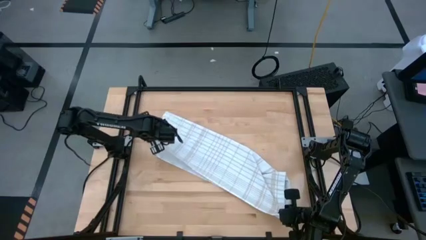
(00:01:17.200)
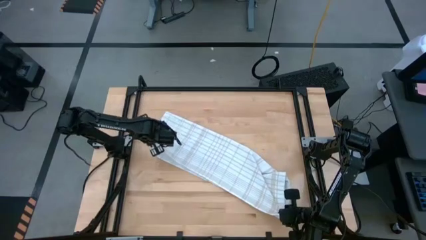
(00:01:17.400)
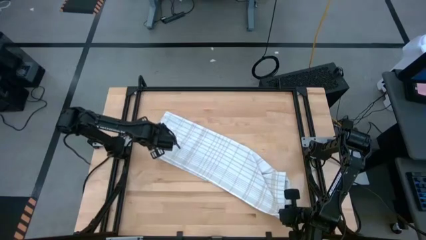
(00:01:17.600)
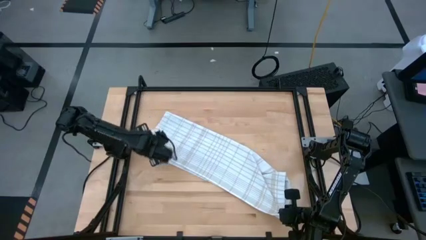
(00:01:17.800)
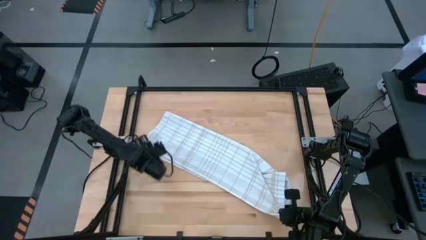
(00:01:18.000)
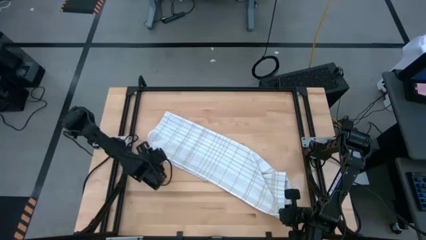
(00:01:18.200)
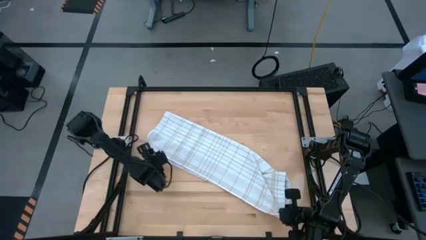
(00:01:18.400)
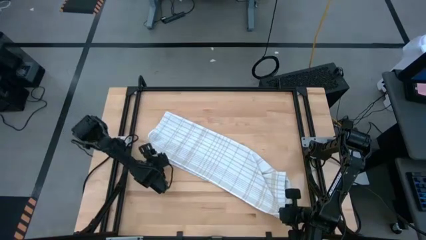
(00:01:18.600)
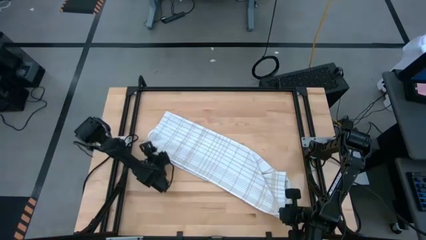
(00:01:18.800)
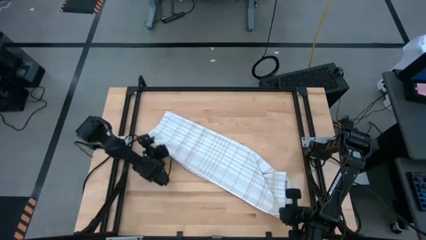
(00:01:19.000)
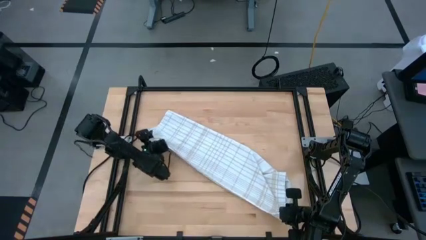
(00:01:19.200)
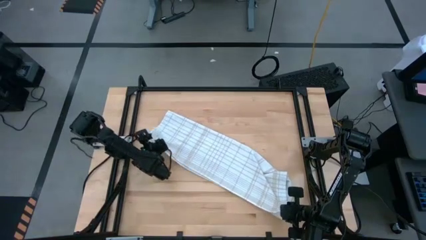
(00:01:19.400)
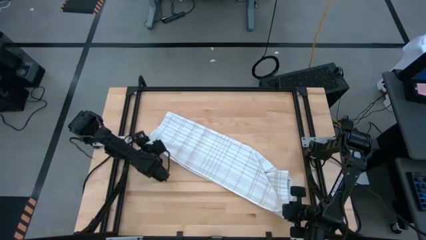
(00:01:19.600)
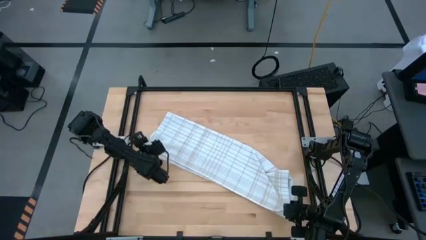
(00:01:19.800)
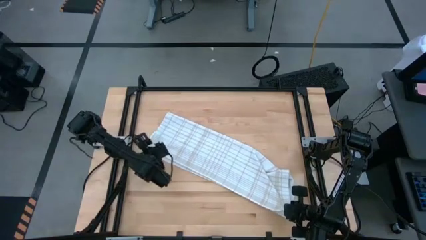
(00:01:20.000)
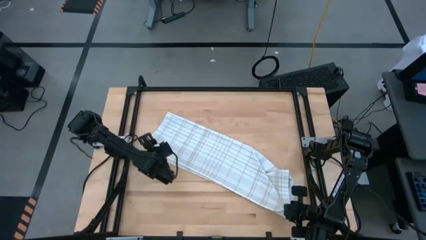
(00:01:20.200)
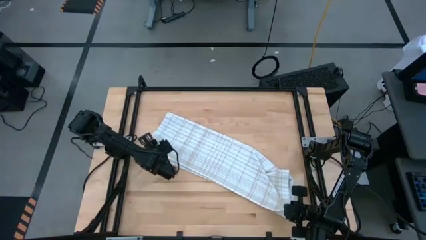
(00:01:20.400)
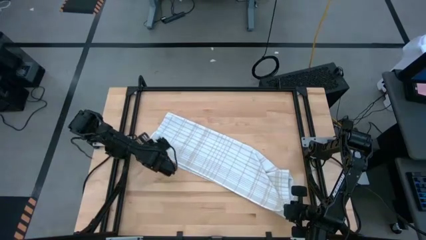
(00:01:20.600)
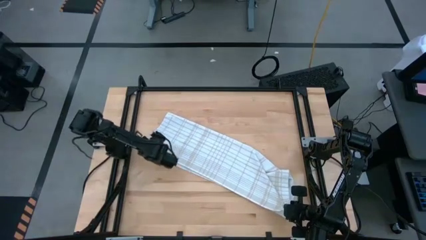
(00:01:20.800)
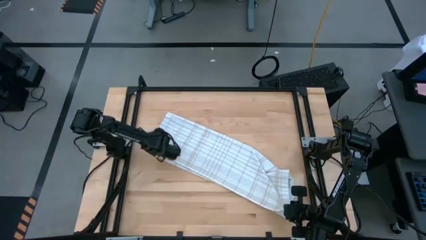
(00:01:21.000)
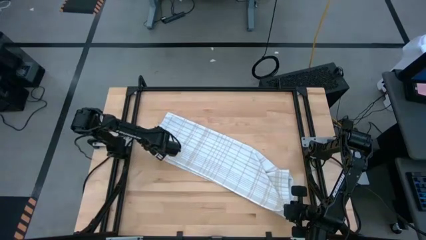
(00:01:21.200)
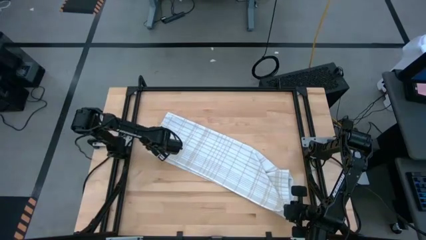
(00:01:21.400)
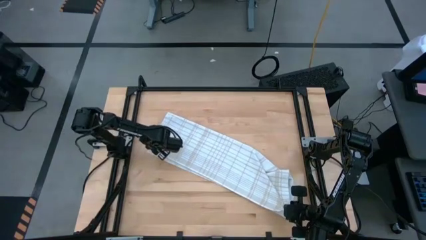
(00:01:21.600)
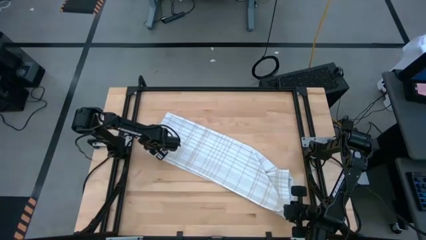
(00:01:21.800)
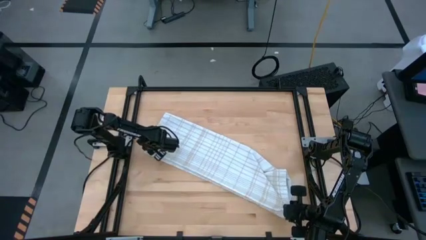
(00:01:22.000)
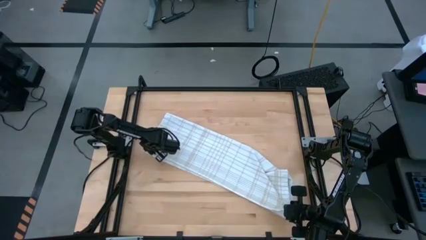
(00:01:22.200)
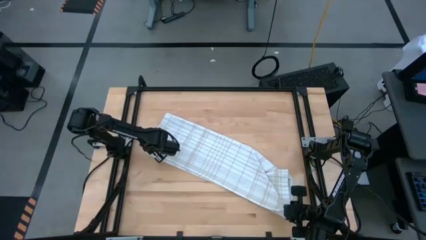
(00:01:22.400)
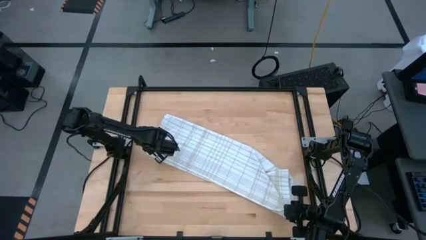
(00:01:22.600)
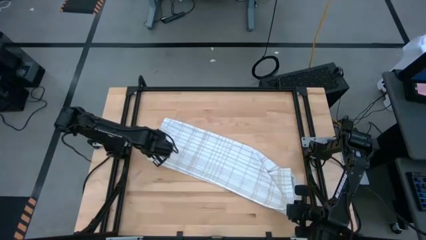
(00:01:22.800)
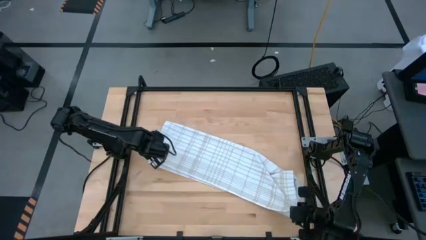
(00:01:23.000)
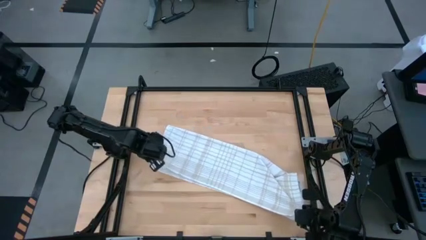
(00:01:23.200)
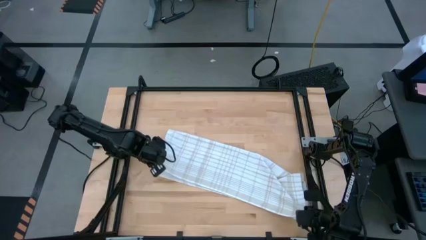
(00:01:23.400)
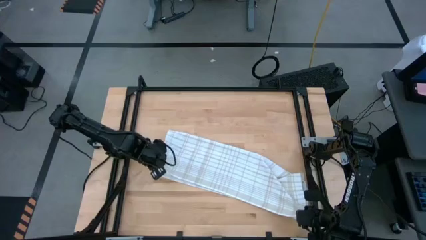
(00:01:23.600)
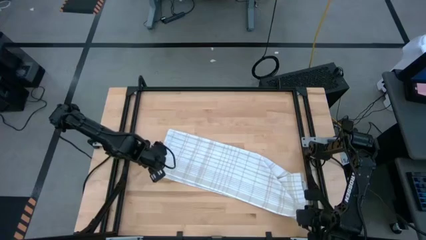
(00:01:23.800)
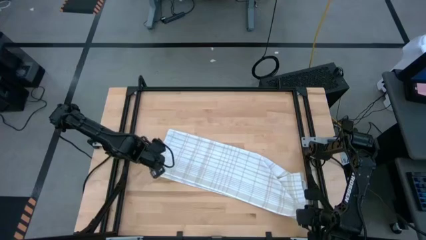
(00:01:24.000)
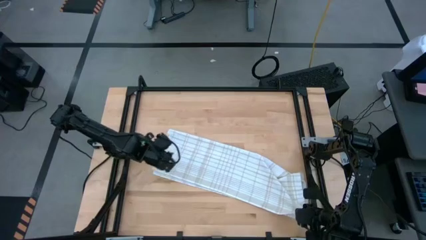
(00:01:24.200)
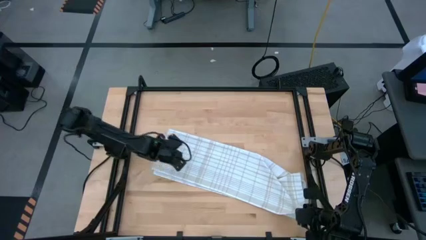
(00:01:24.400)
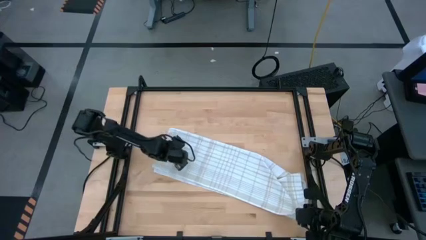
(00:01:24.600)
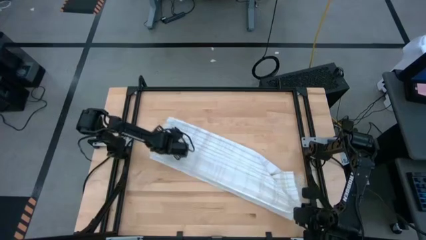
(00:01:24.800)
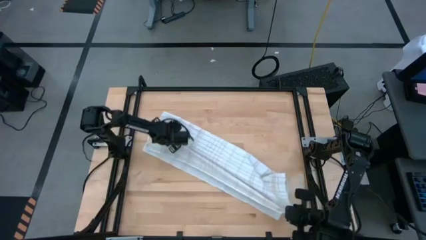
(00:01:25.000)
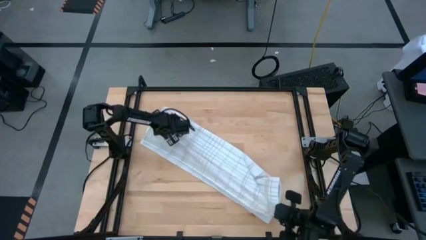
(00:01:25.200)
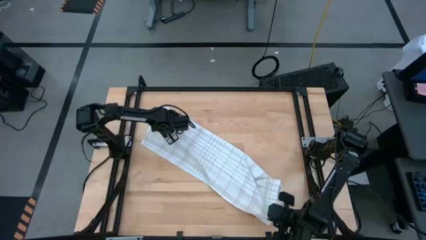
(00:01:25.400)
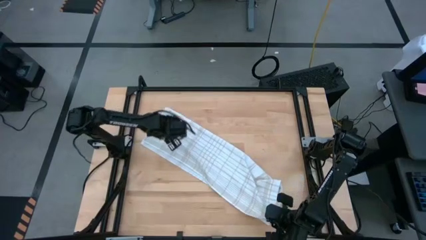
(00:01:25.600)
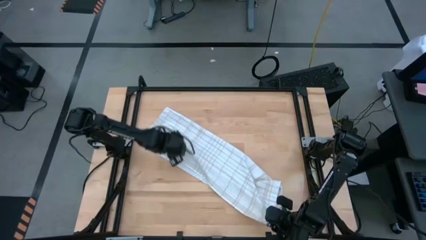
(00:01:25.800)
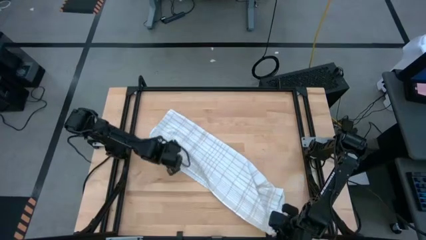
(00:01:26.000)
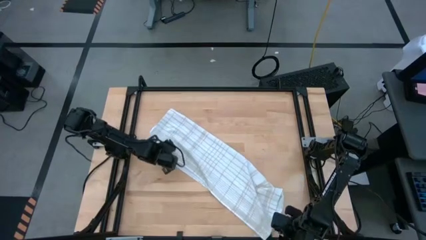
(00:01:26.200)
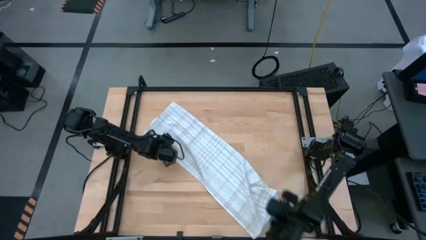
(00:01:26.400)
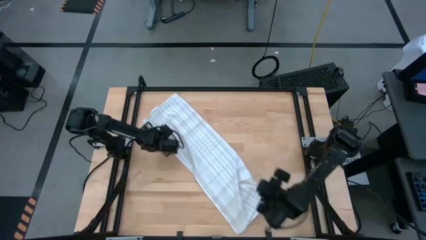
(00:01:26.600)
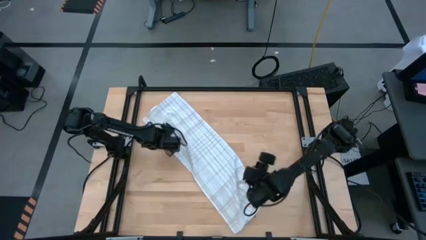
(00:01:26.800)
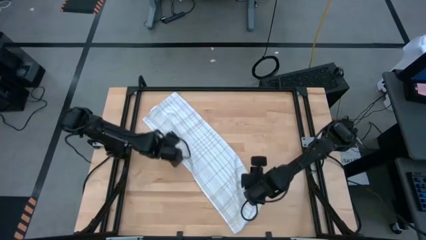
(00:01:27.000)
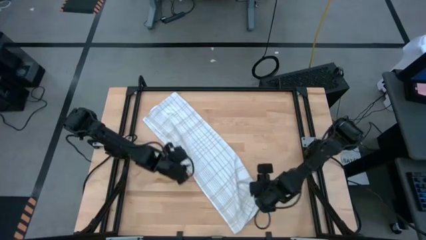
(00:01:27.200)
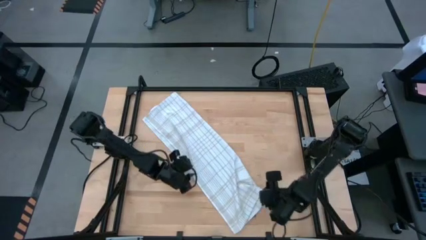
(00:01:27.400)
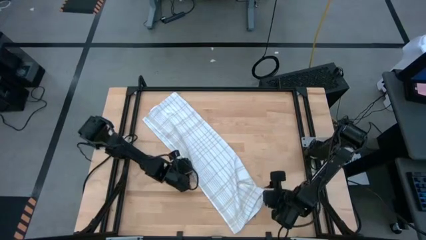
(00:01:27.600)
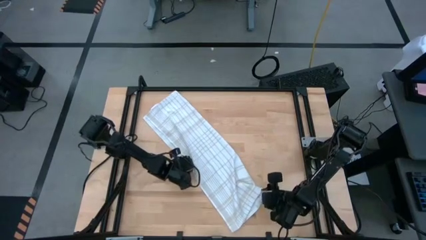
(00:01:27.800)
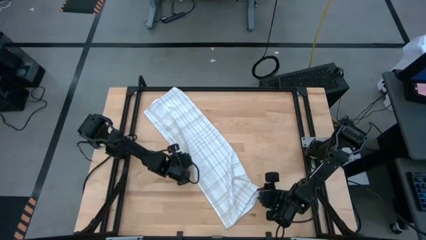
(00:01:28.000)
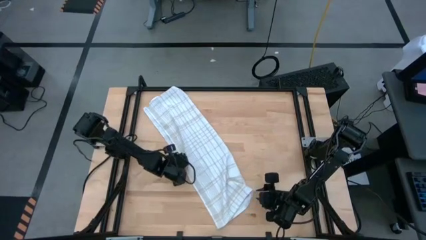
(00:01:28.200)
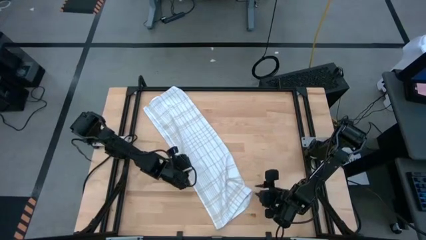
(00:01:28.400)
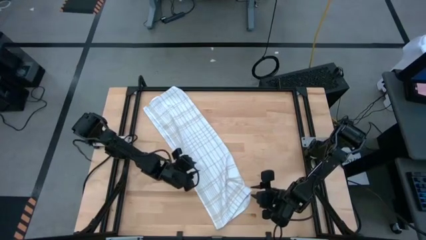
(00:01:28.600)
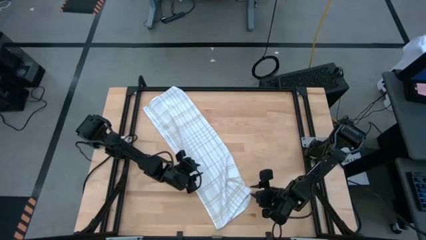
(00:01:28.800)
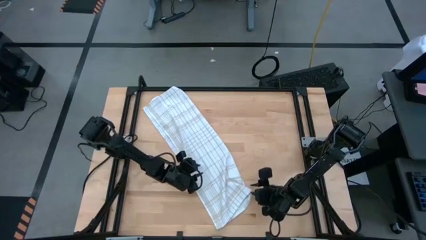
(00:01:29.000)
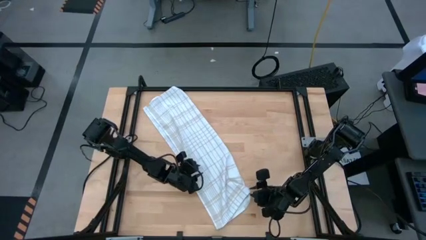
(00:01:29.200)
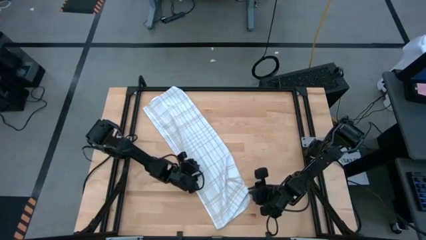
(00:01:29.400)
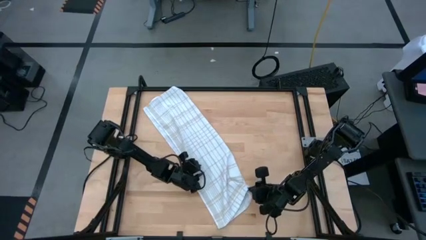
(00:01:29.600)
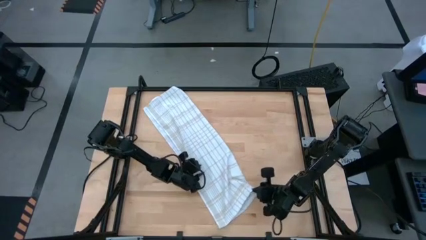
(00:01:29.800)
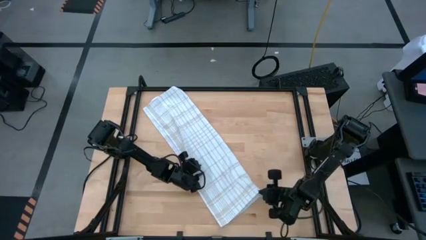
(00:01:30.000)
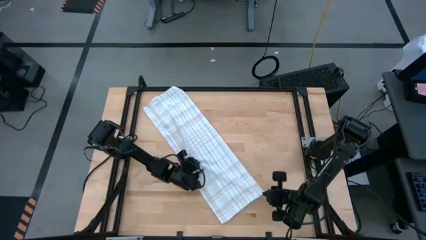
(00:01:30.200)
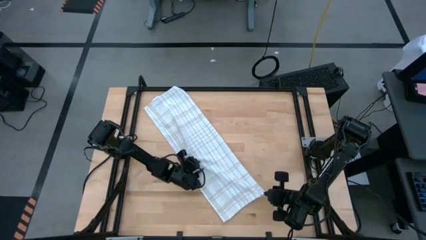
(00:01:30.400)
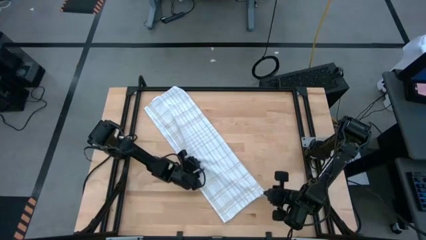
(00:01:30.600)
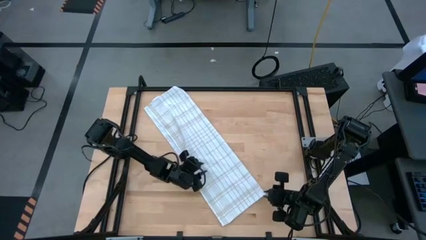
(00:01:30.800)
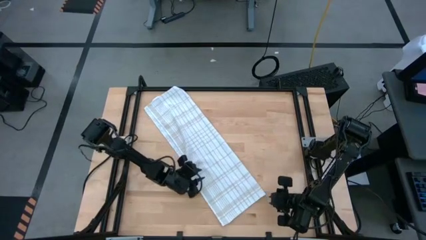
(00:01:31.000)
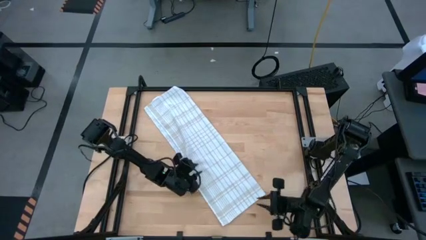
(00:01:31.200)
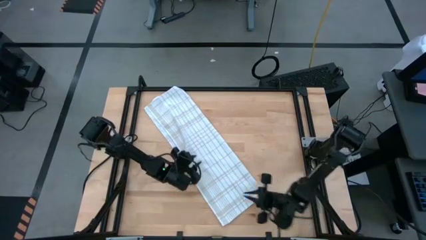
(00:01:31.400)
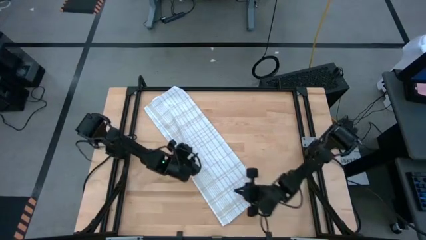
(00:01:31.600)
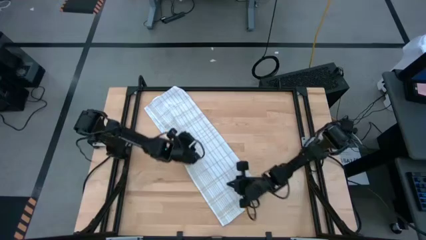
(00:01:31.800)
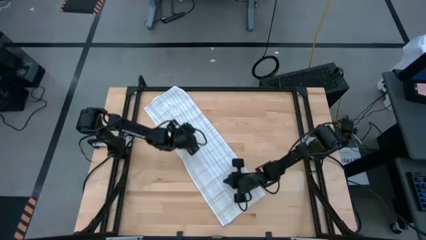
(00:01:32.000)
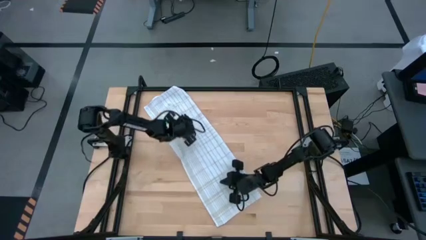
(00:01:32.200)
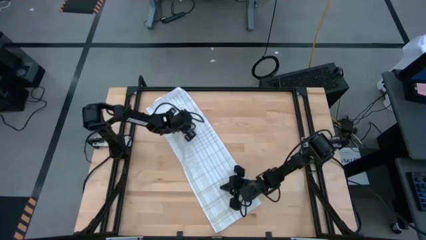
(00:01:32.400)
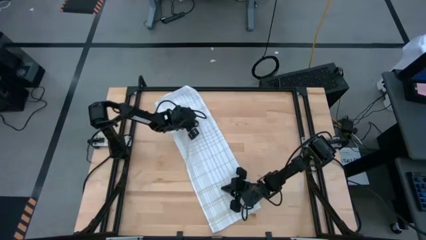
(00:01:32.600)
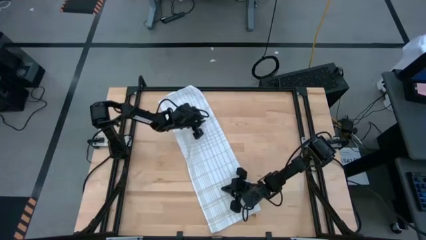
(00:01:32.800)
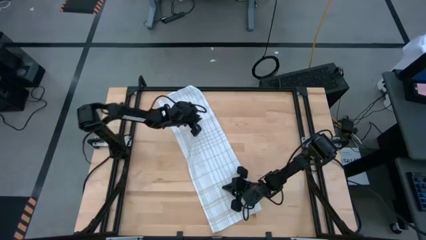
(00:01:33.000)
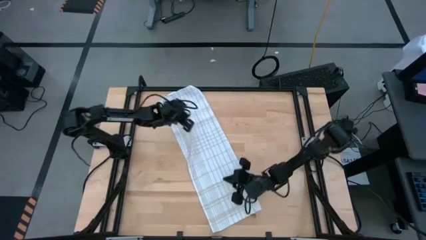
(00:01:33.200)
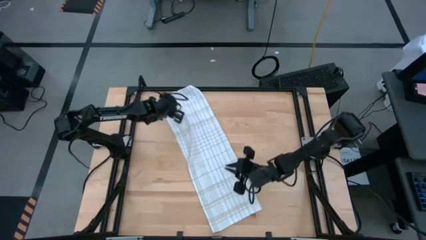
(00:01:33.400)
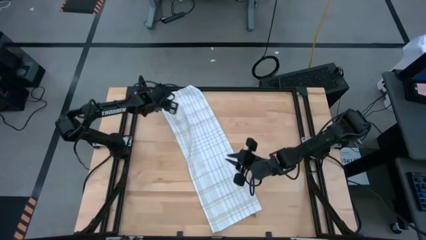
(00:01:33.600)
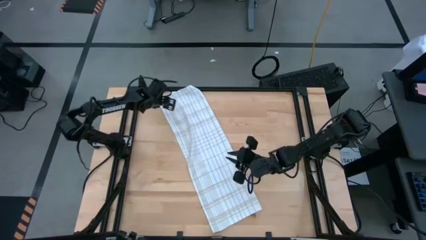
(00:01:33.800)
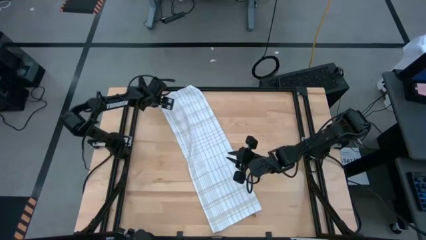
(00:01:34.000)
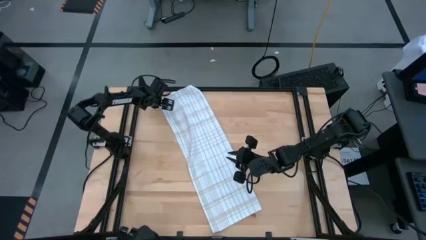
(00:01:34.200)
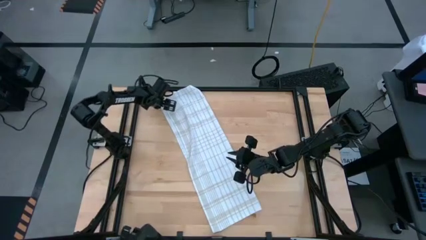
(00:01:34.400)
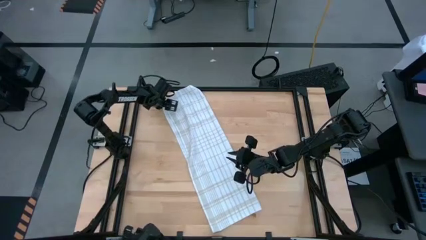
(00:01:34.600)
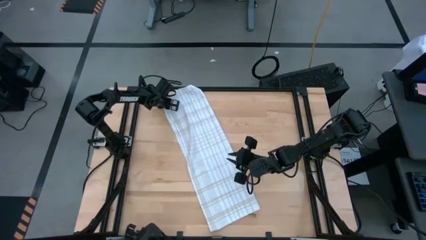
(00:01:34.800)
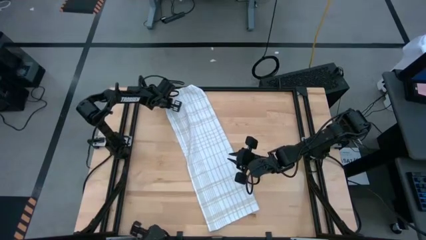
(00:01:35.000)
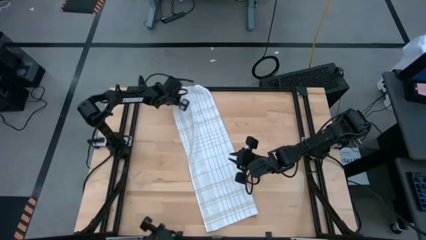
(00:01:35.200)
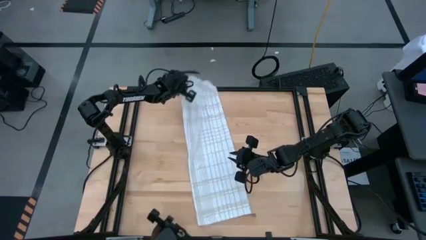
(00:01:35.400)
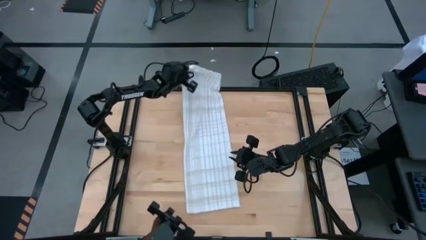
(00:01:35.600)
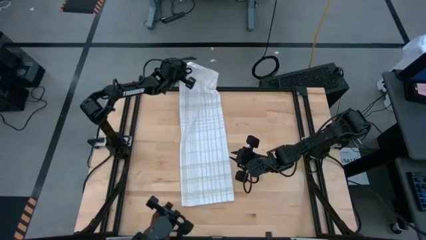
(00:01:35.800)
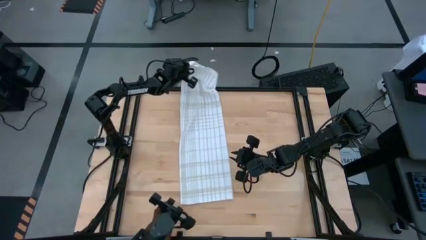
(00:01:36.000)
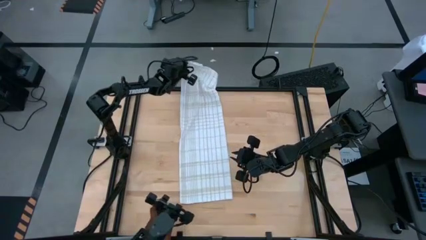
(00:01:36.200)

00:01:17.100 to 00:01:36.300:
Task: Roll towel
Fold the white towel
